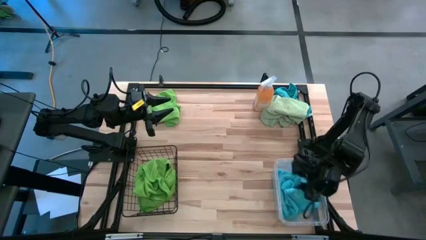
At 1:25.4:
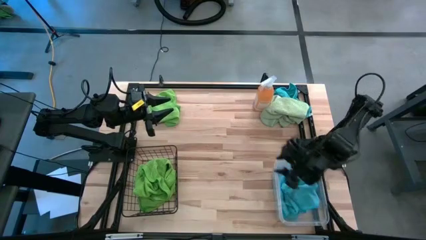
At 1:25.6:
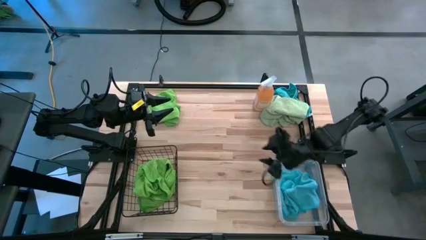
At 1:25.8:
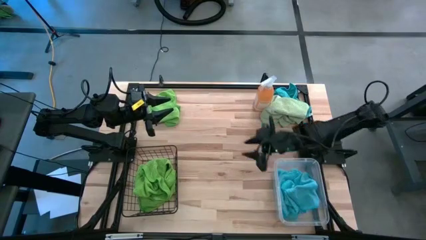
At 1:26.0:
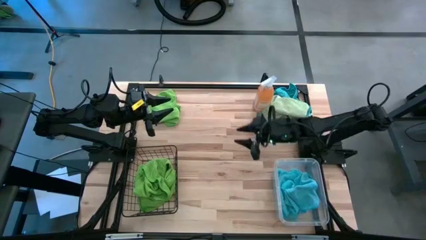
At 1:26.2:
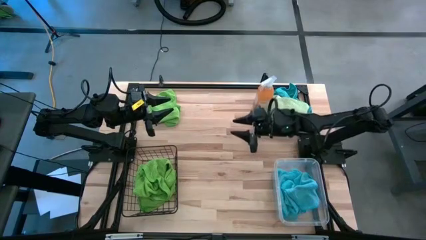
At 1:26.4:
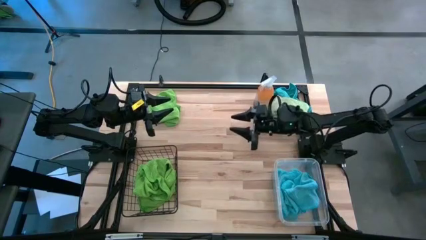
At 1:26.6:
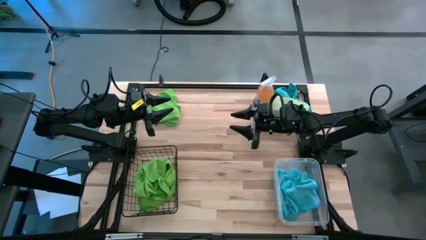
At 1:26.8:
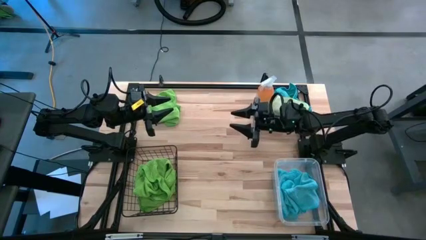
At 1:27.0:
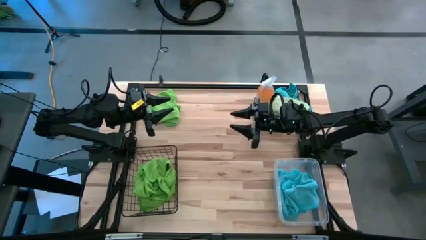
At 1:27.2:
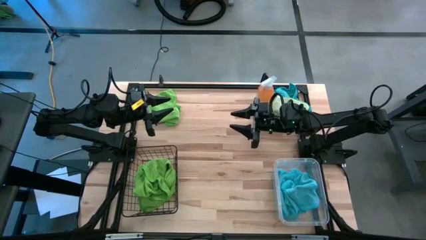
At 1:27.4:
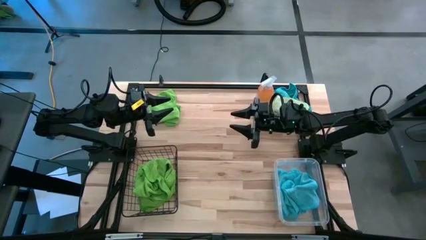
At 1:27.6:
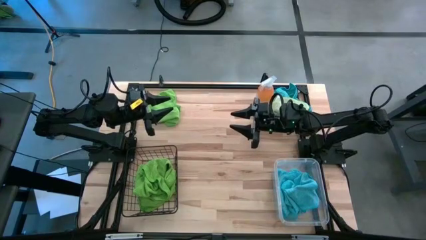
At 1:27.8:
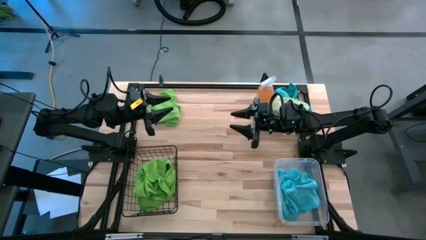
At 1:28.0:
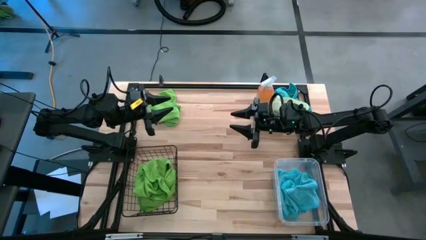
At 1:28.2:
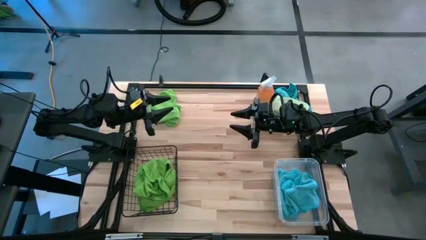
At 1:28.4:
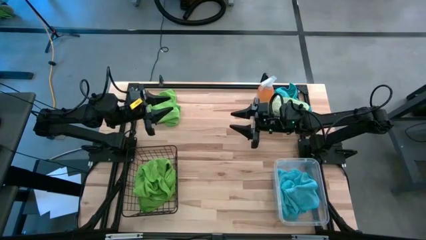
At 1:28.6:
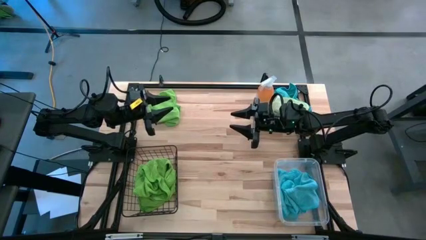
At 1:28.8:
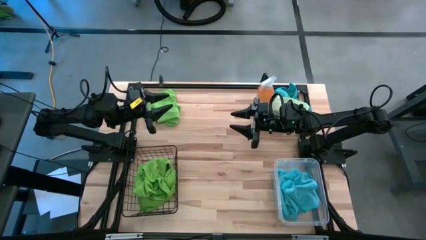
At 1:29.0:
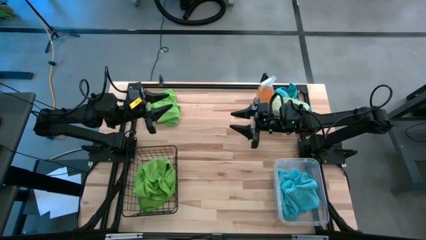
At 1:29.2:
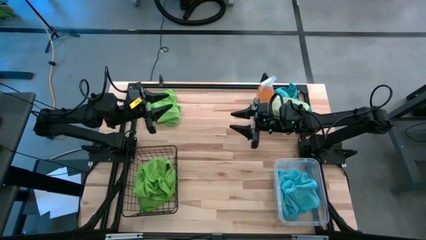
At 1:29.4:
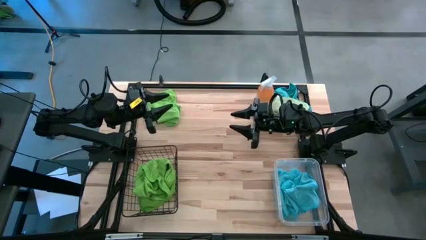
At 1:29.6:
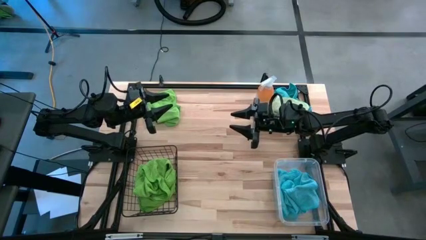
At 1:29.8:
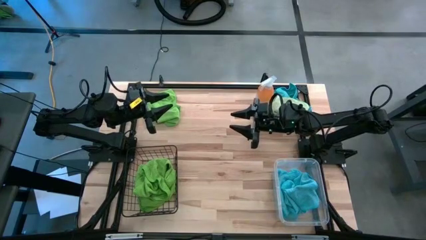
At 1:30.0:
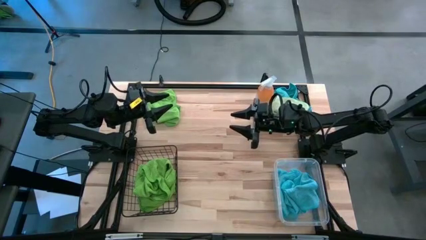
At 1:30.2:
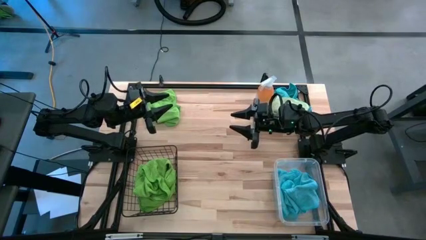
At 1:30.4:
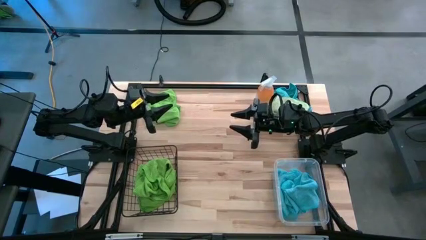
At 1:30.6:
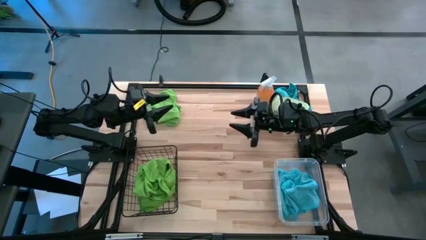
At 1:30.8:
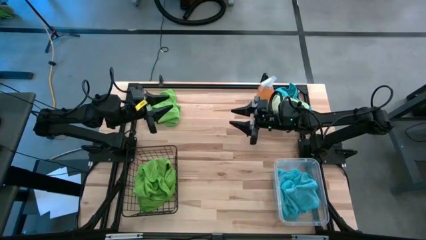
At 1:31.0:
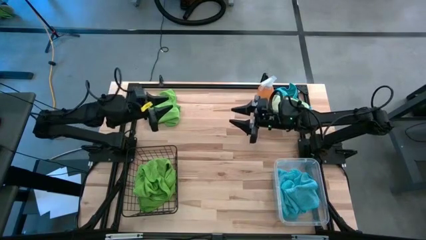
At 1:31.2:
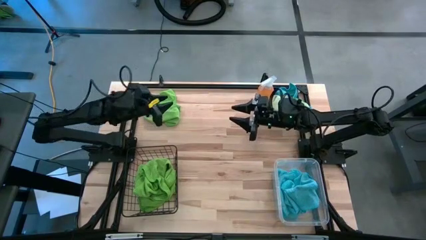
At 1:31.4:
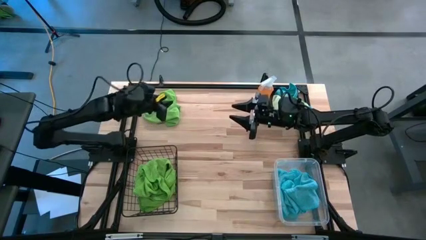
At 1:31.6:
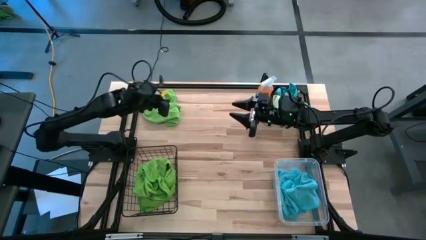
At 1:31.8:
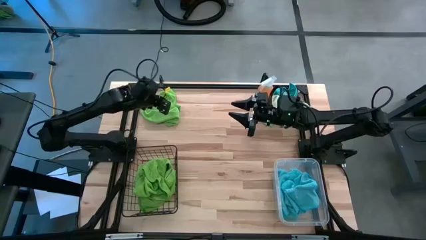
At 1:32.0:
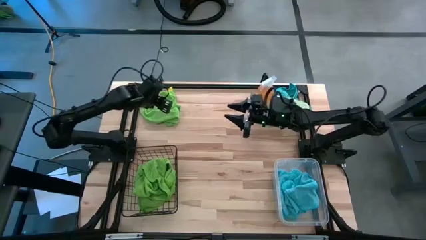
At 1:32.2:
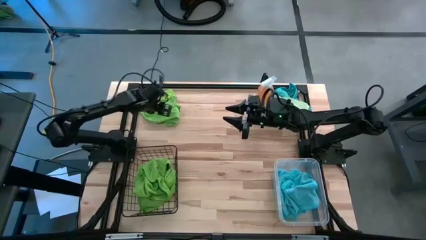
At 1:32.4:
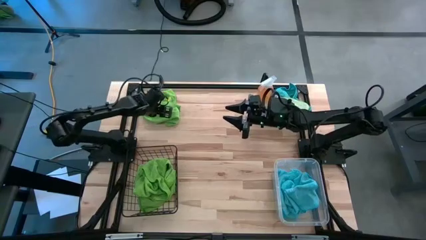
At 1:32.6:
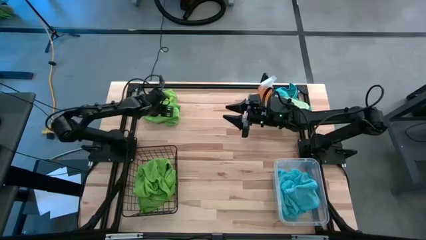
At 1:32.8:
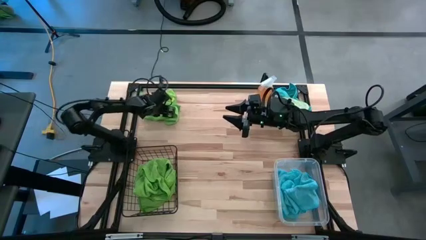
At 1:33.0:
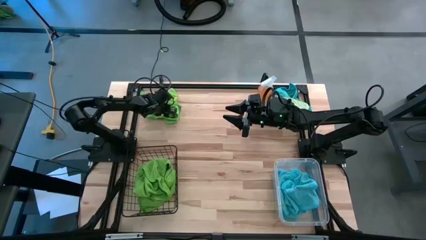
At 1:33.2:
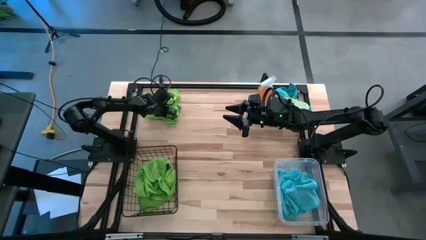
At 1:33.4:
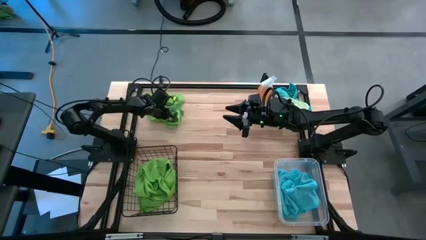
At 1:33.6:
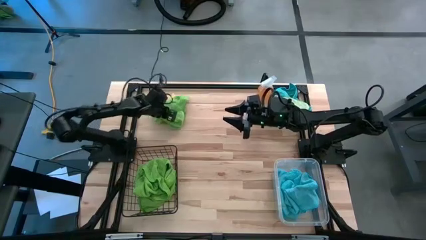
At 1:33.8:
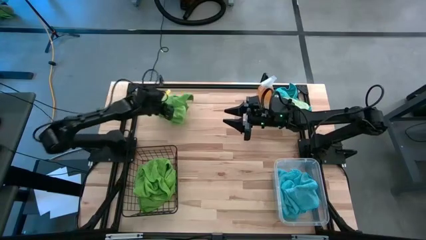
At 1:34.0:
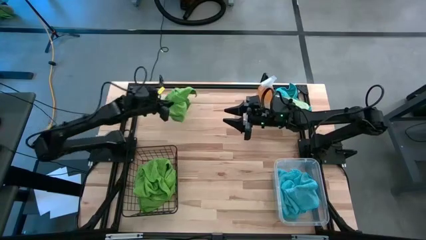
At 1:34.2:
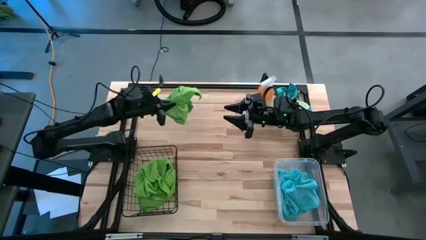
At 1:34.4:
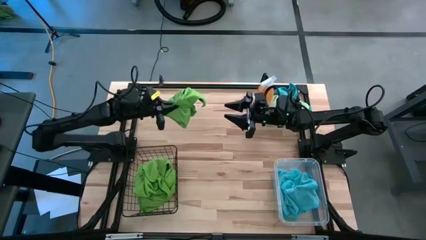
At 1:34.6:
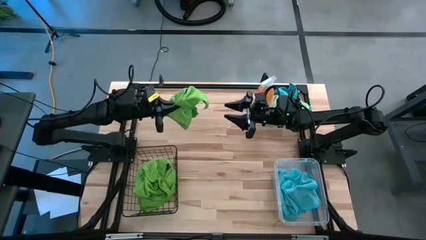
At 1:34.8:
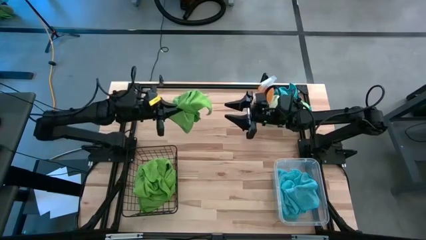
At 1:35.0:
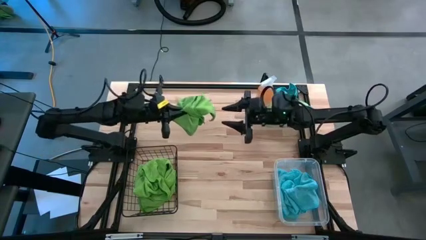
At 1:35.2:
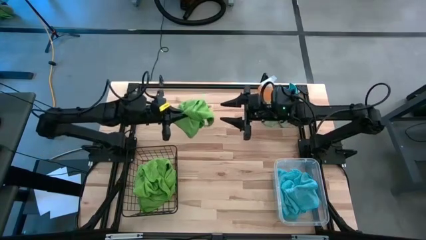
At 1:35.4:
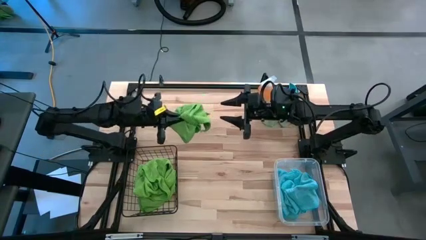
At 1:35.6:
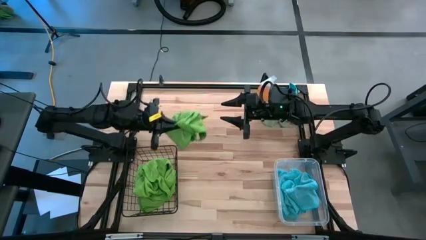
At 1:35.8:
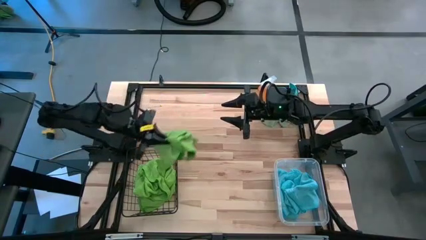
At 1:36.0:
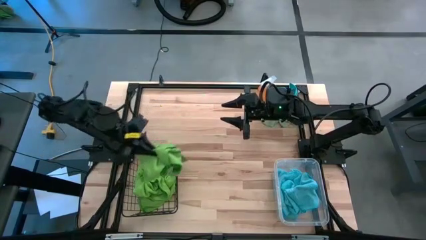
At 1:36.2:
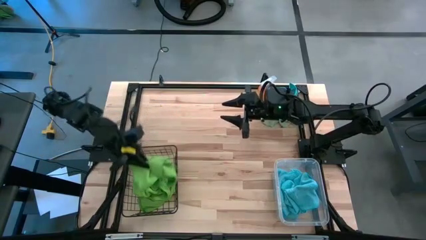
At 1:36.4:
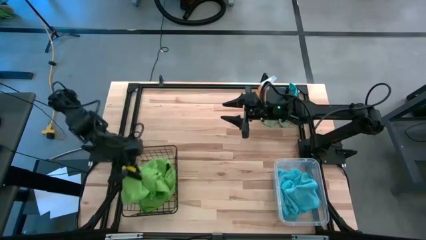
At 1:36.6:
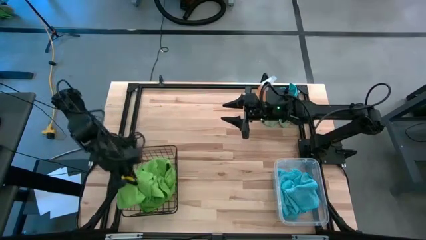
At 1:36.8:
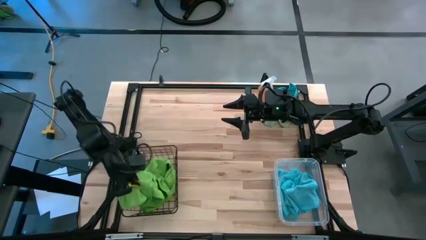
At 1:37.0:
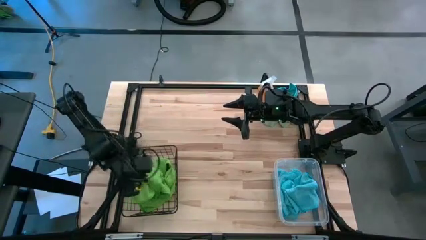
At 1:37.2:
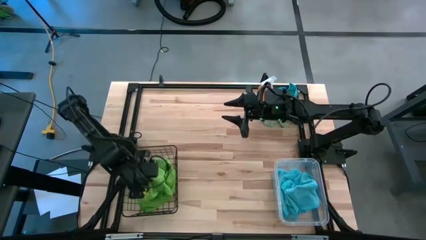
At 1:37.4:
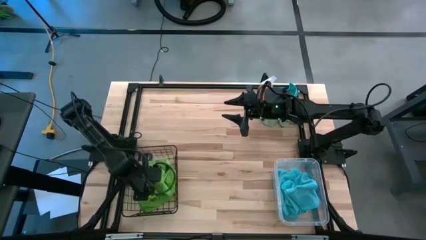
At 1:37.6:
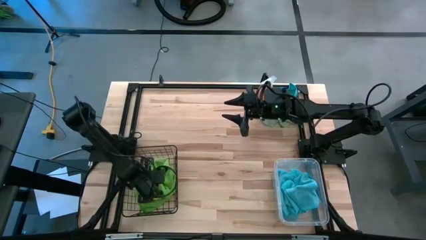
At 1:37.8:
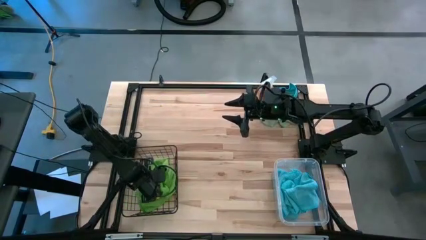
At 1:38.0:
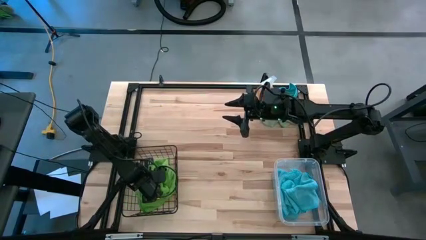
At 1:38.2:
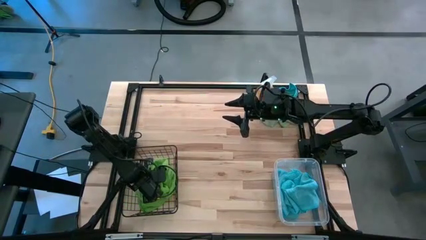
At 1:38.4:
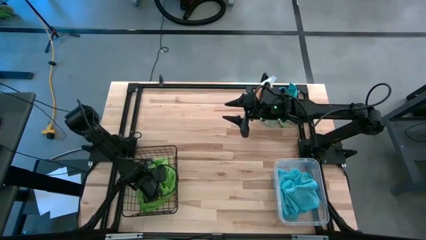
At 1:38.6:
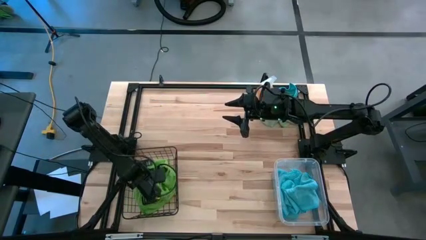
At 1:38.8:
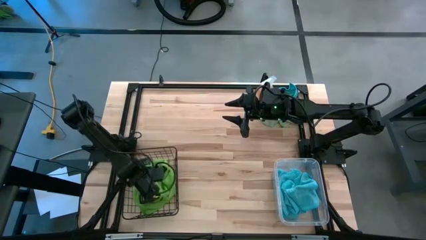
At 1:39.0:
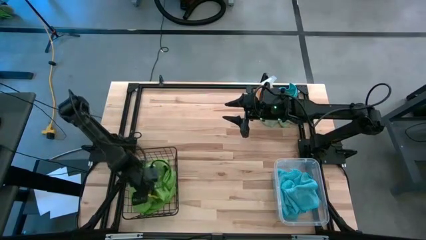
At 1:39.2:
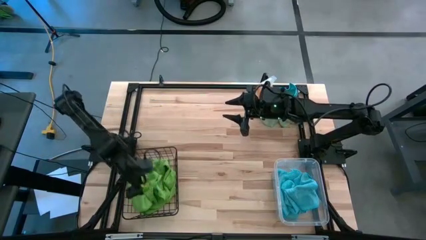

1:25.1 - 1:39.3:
Task: Sort microfiber towel by color & place in baskets
Put the green microfiber cloth into the black wire basket
